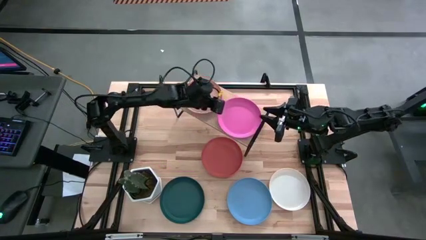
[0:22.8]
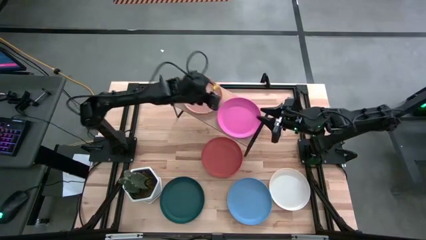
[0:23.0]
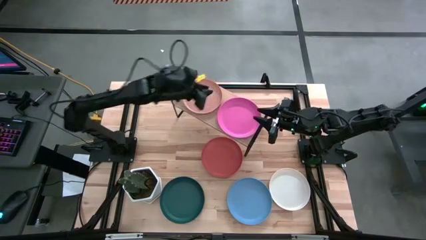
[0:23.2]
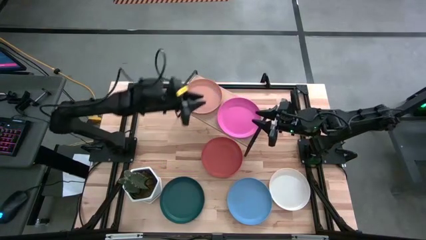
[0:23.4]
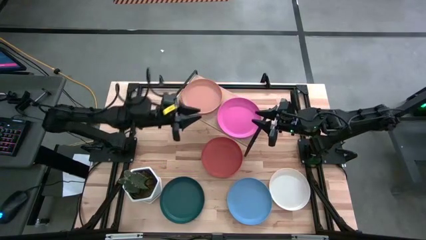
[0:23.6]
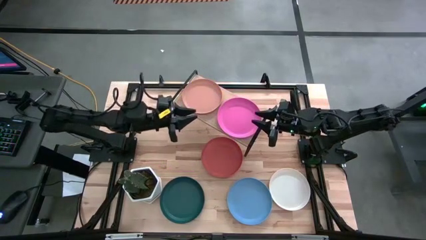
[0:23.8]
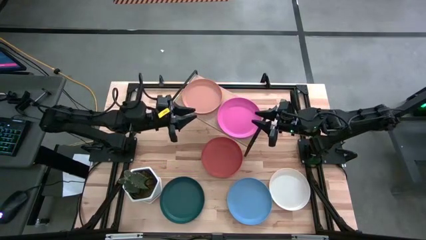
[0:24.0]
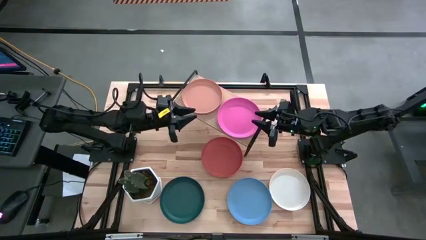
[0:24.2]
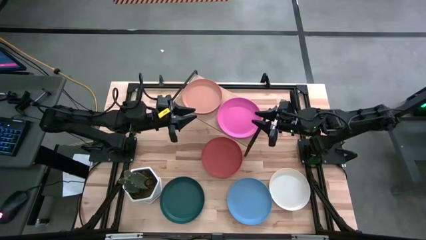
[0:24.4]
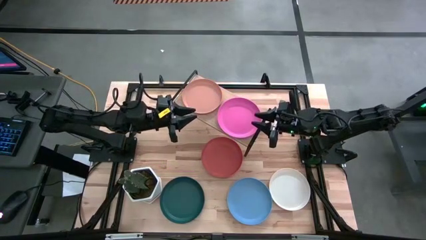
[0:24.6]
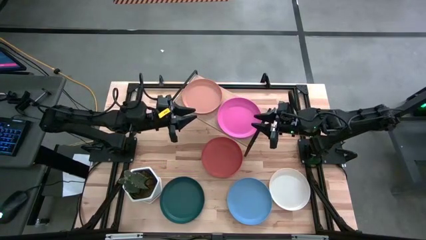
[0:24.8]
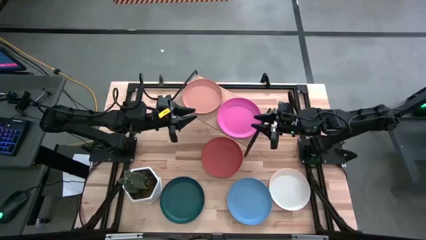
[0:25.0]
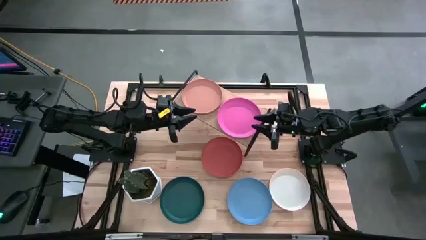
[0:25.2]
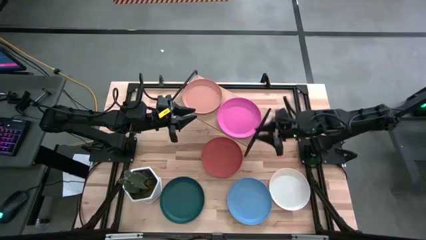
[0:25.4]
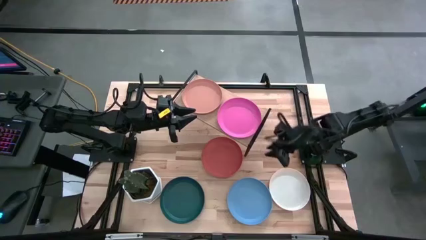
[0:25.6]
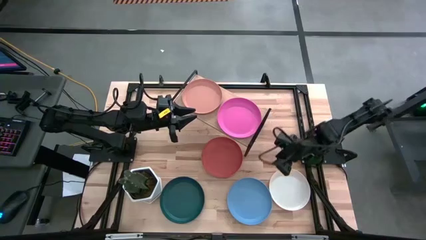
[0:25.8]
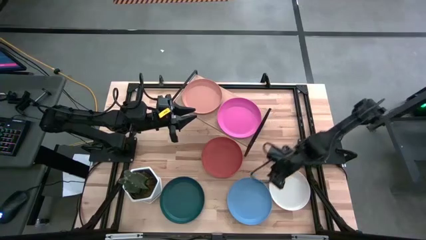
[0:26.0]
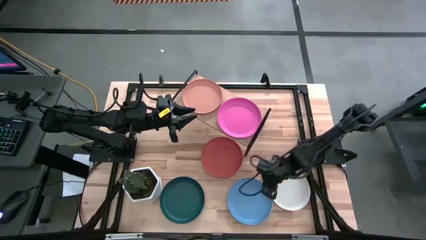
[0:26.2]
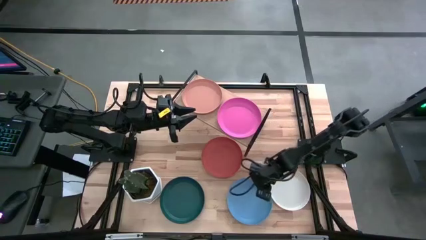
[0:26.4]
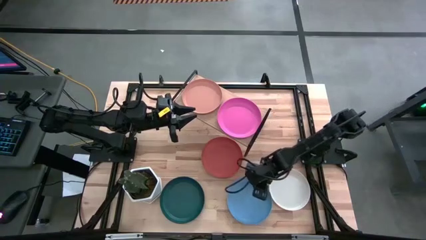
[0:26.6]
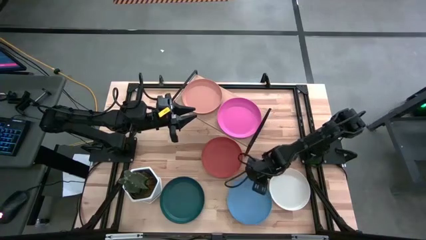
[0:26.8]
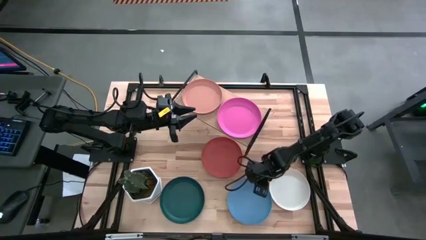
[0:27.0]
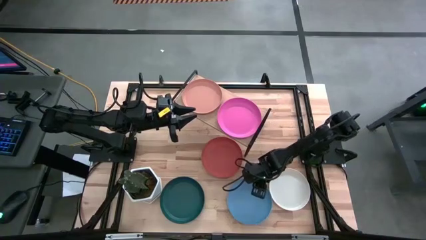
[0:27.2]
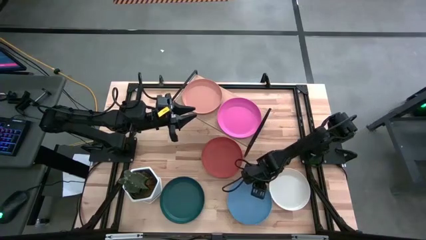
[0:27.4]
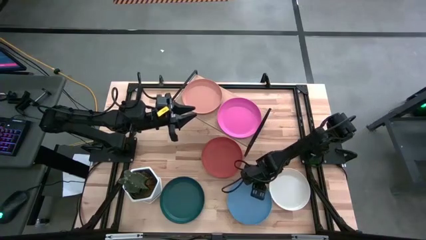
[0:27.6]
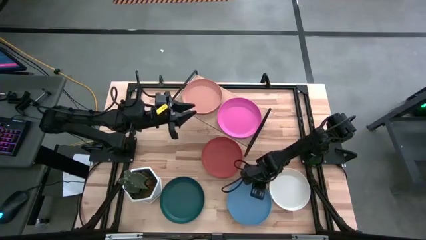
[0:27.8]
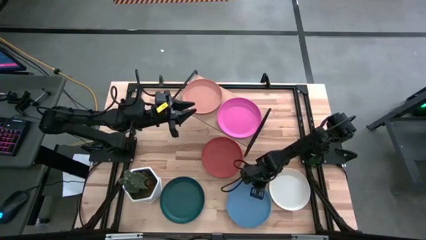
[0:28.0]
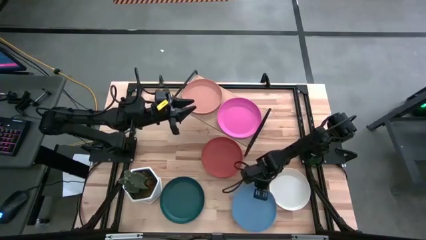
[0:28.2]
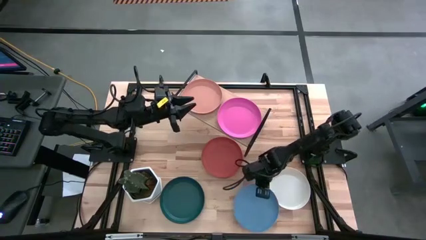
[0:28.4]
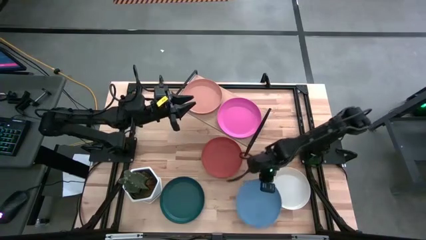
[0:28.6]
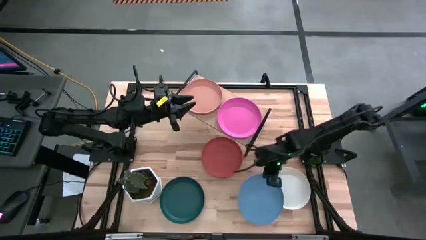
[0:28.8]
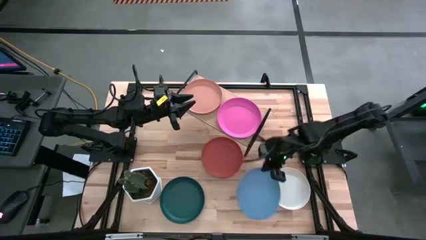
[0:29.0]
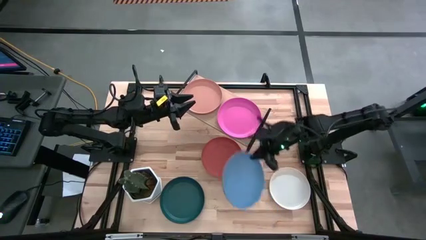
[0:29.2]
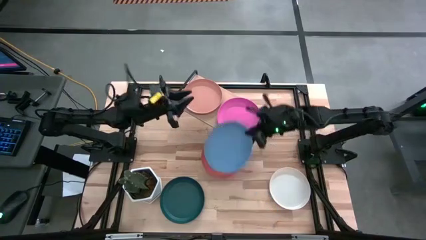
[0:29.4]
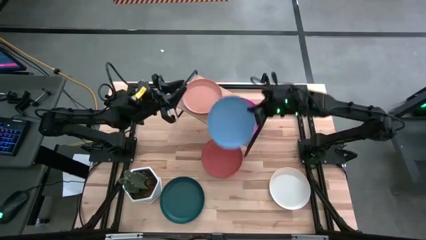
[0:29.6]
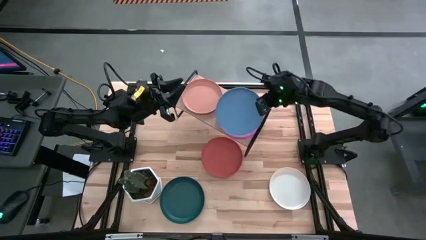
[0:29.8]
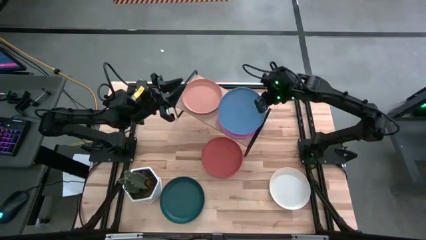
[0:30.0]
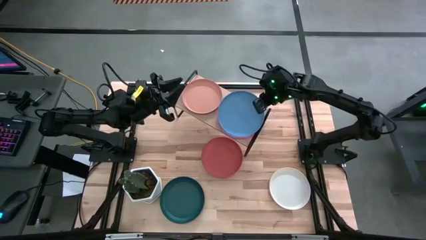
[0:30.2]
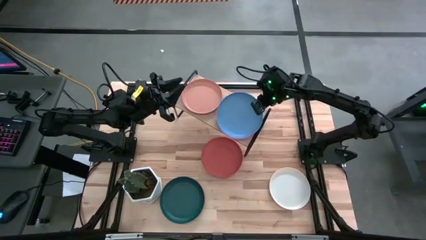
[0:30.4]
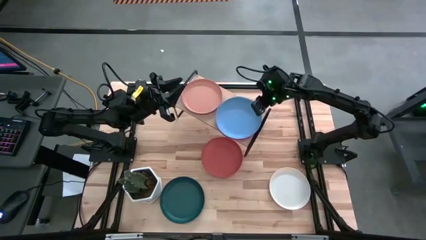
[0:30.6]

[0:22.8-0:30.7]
Task: Place and stack plates onto a shelf
Stack the blue plate on top of the pink plate on the shelf

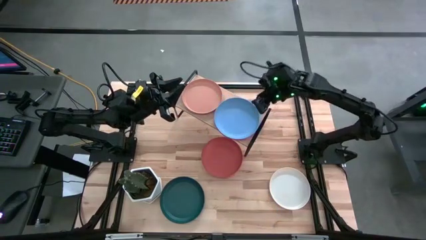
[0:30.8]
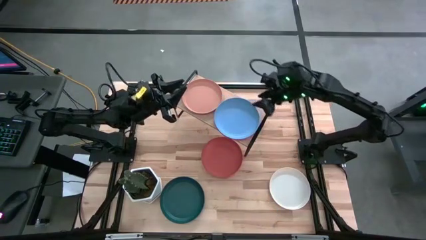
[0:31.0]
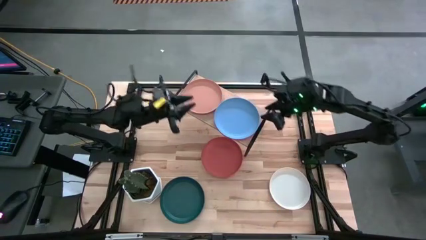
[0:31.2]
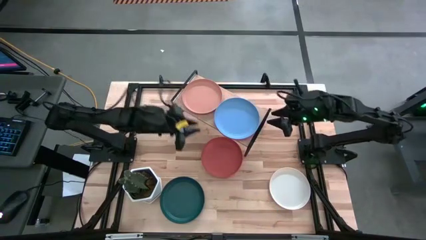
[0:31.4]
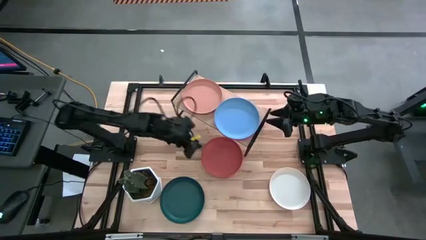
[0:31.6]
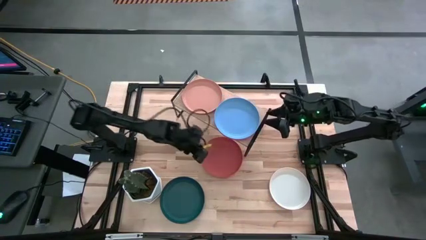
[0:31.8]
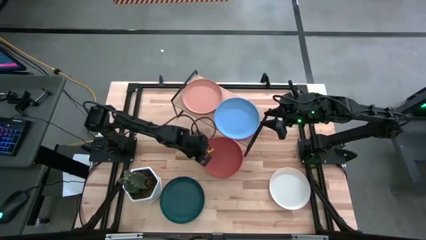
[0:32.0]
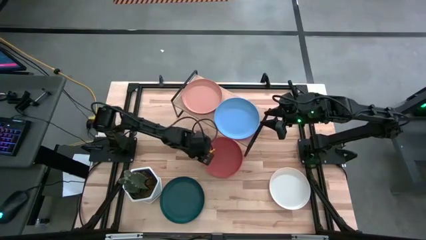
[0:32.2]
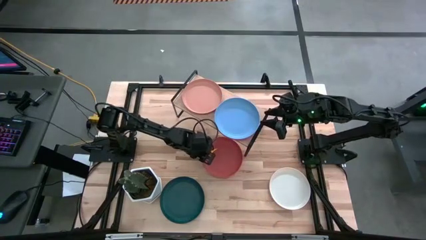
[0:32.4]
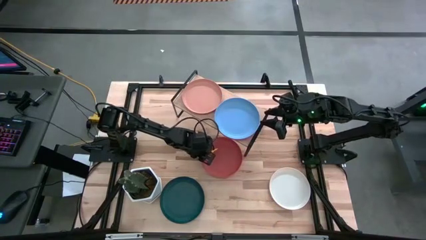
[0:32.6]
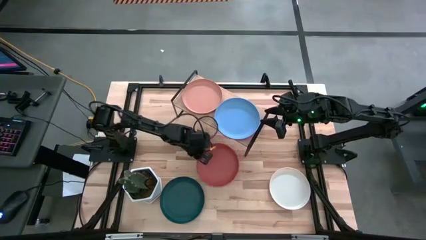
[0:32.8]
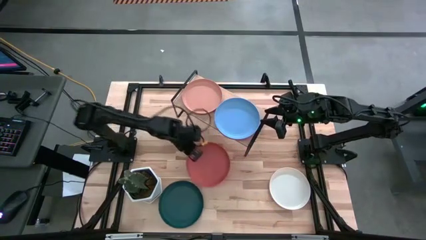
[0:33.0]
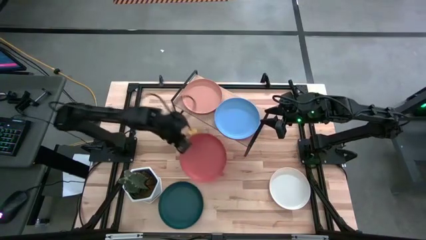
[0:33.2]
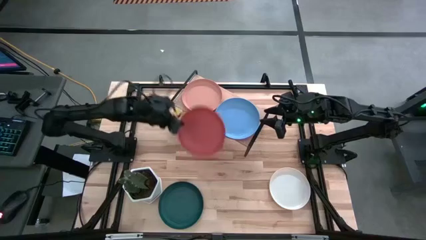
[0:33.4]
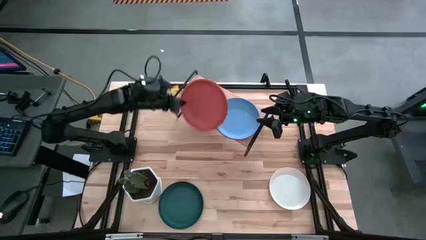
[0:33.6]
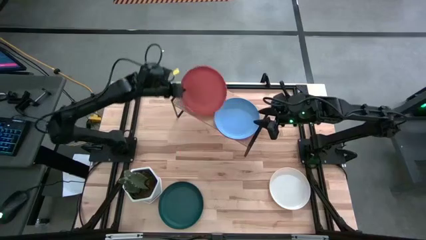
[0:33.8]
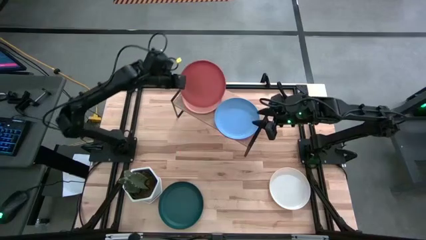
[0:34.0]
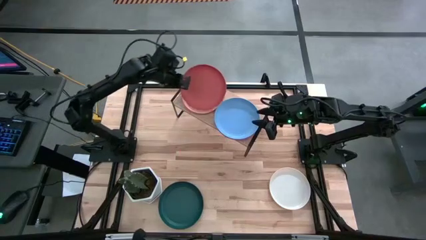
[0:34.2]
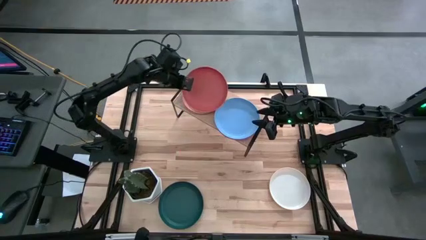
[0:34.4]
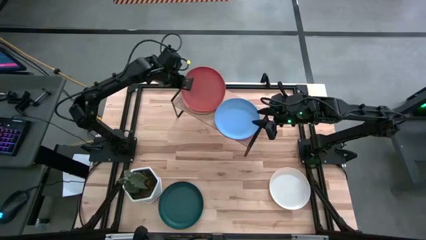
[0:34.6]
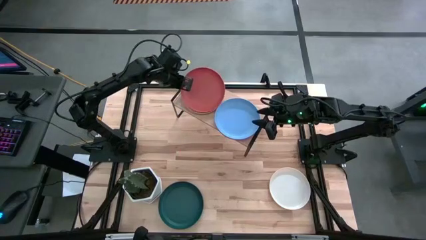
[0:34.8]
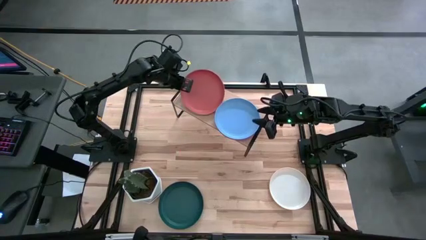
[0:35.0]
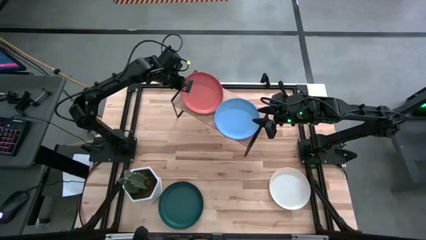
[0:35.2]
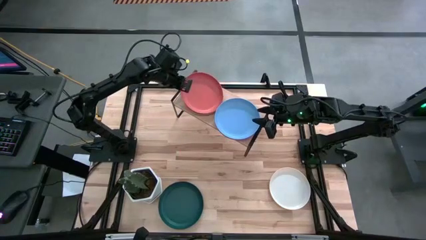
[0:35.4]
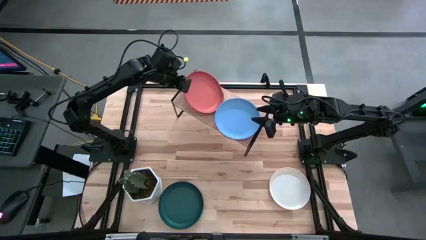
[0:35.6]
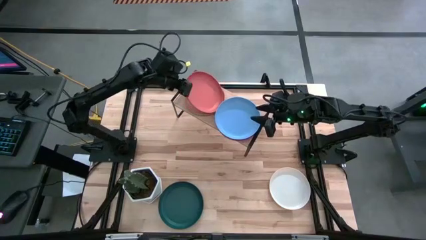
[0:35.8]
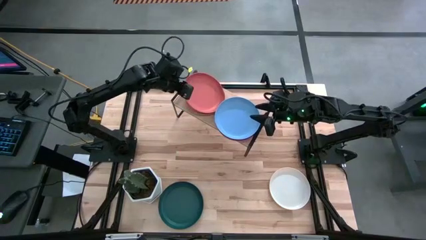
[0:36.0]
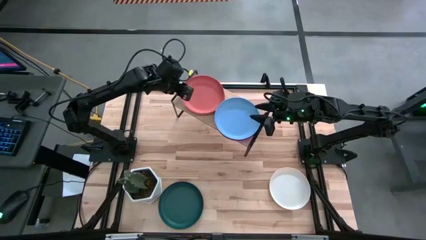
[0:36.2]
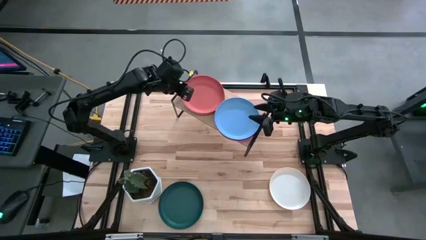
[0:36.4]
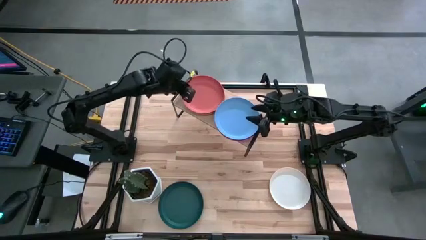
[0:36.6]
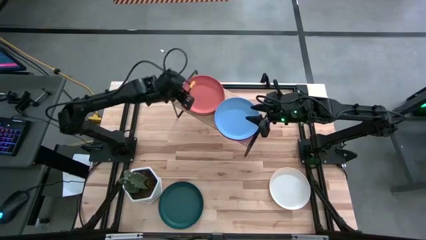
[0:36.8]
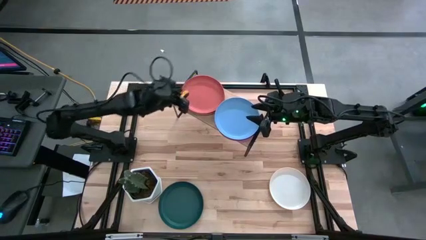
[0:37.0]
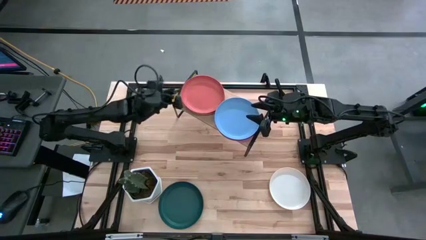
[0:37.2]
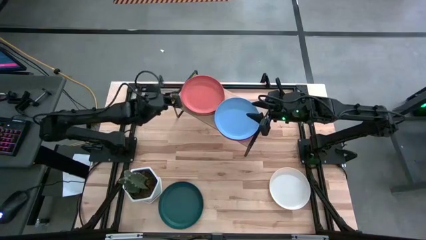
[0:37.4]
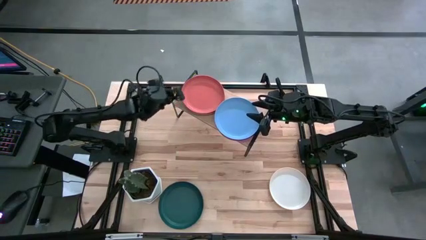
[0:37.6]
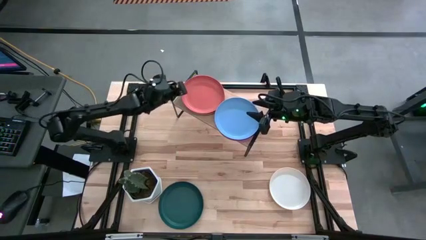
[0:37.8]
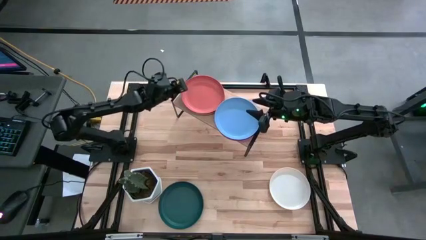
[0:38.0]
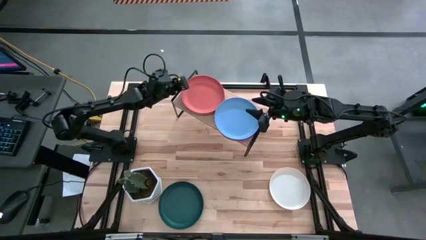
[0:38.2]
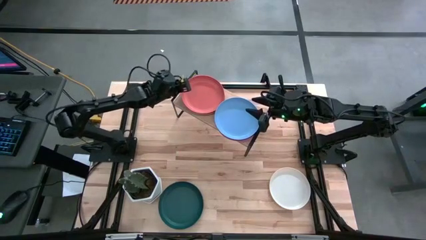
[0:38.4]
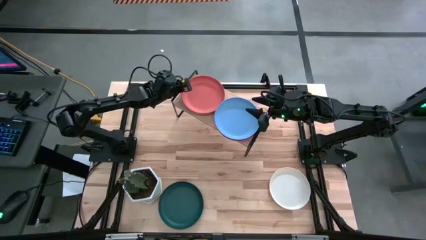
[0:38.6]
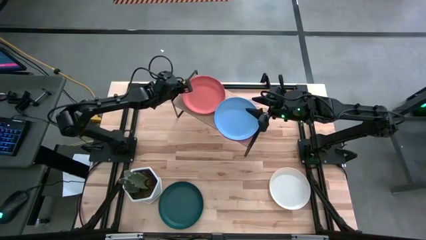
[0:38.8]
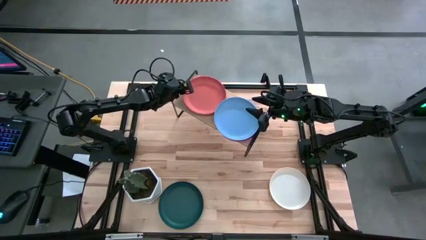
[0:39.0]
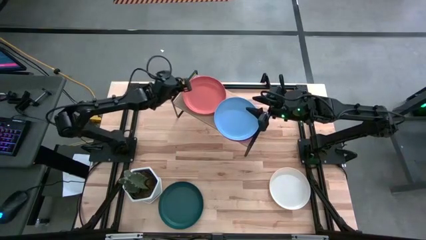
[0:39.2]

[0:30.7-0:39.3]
Stack the dark orange plate on top of the orange plate on the shelf

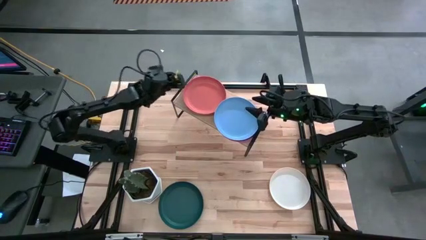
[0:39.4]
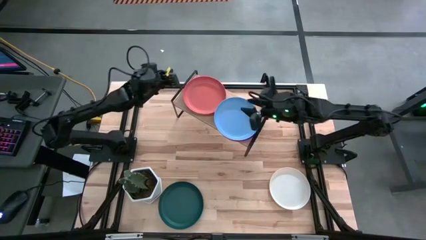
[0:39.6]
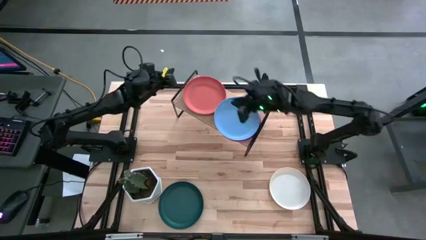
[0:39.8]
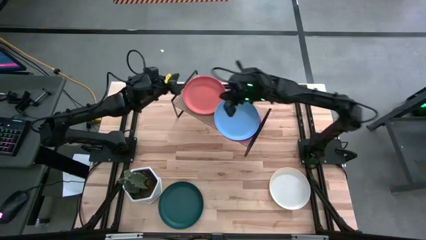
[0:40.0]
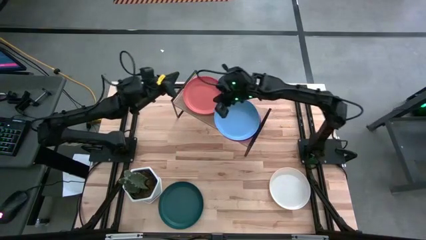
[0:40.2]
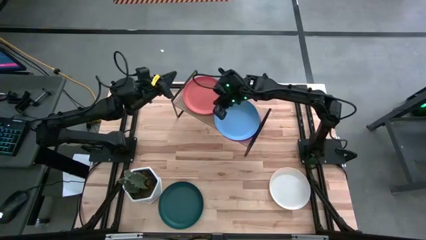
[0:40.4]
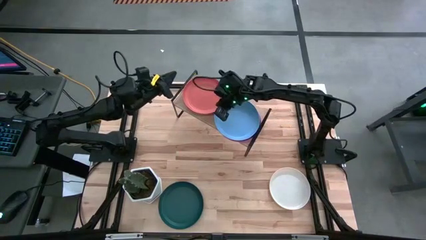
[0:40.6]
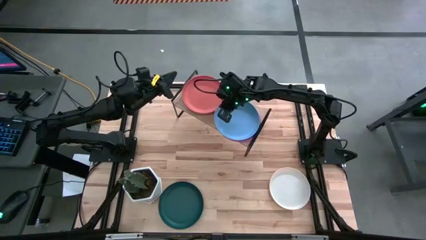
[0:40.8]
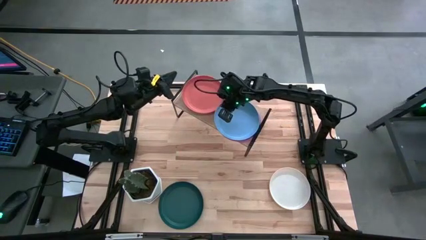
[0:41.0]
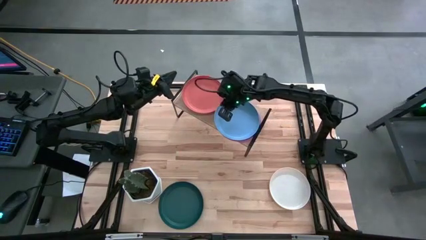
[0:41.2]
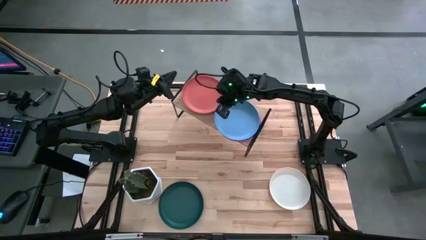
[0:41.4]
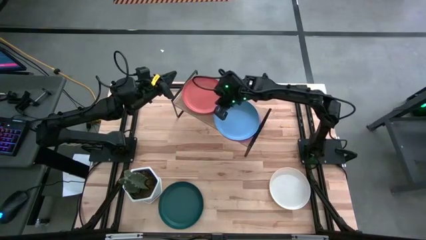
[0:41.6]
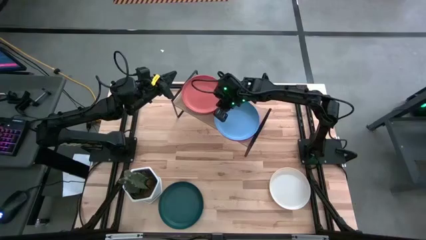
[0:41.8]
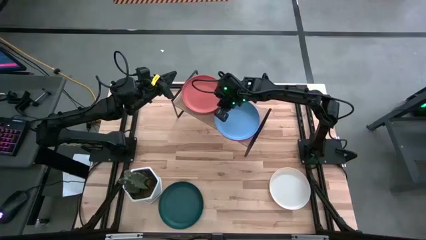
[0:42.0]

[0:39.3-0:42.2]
Adjust the stacked plates on the shelf
